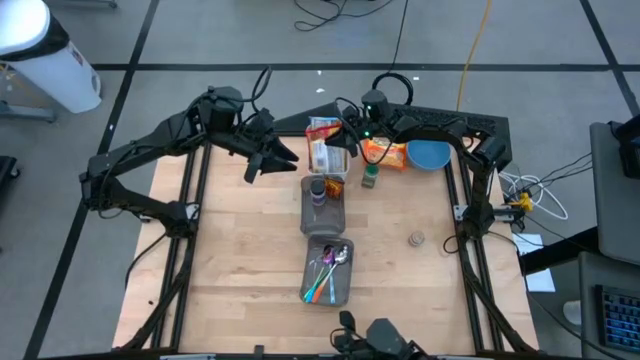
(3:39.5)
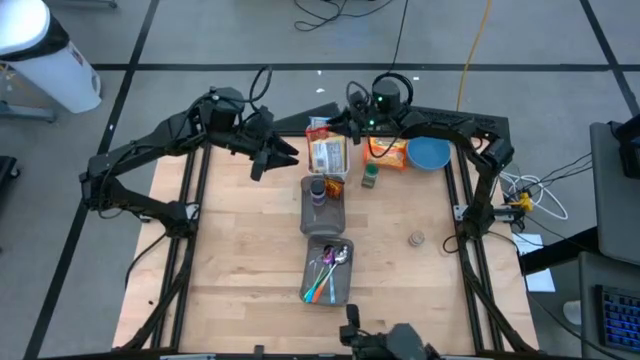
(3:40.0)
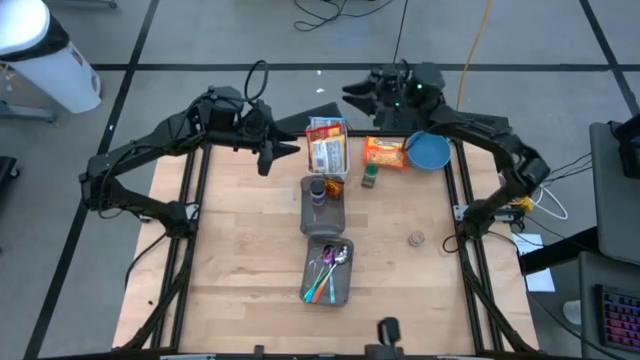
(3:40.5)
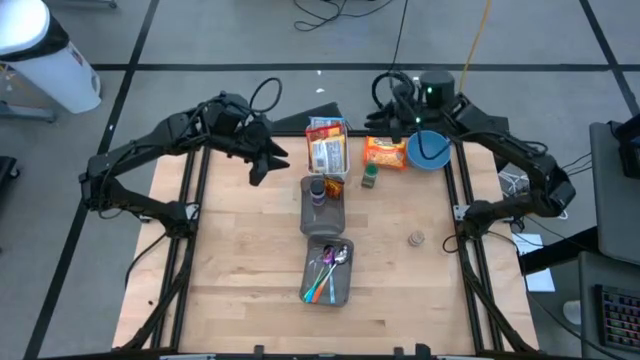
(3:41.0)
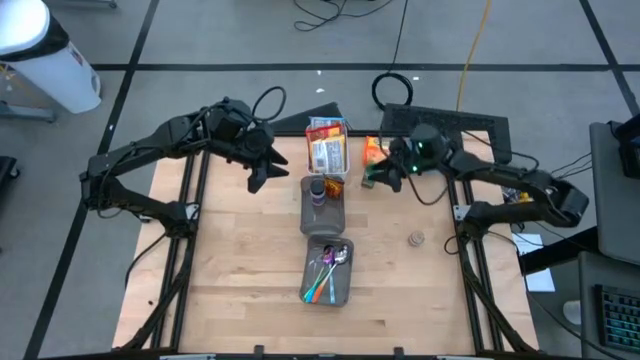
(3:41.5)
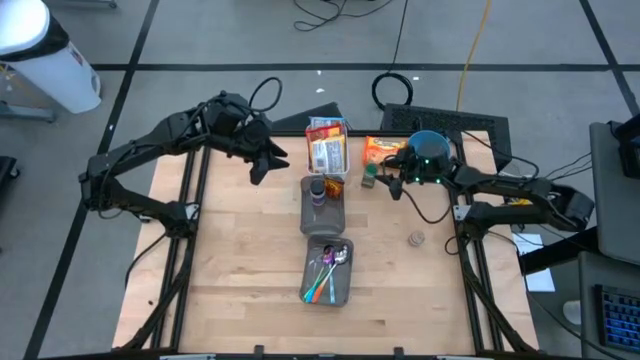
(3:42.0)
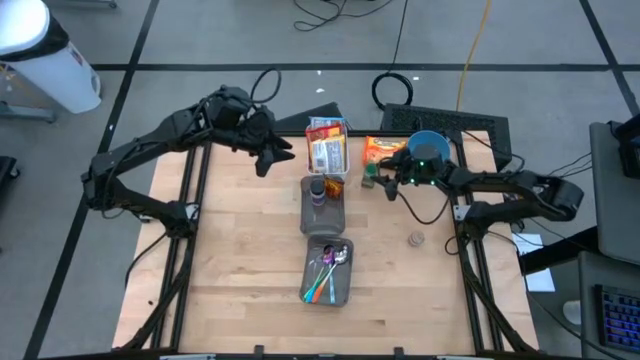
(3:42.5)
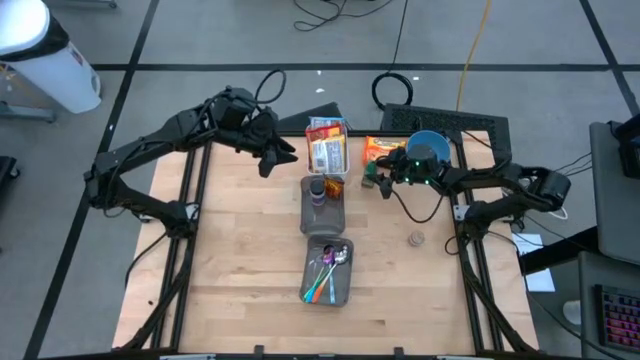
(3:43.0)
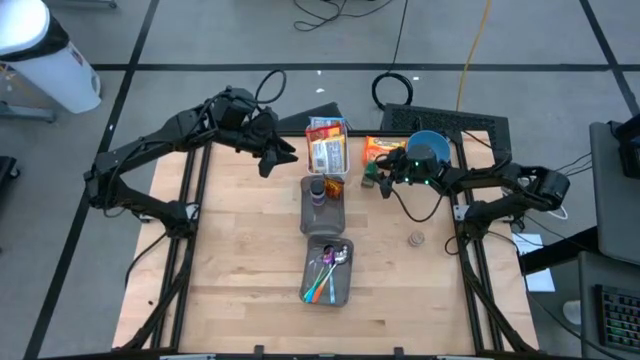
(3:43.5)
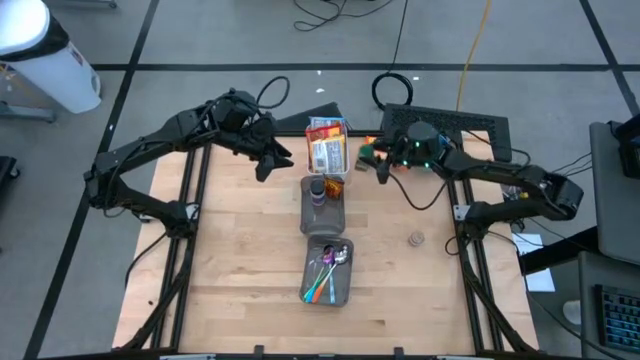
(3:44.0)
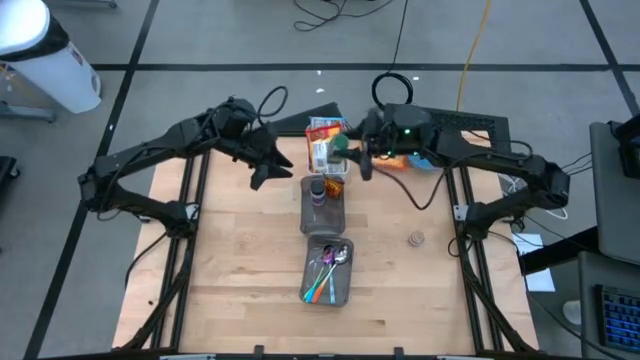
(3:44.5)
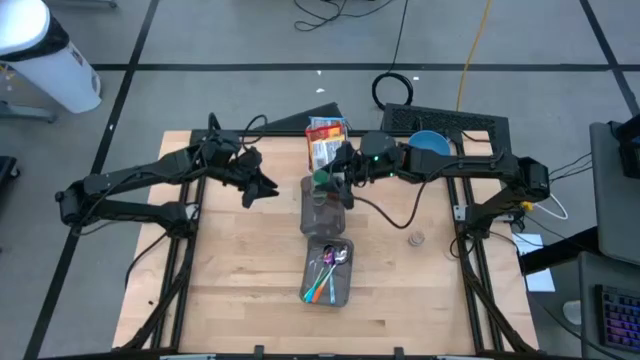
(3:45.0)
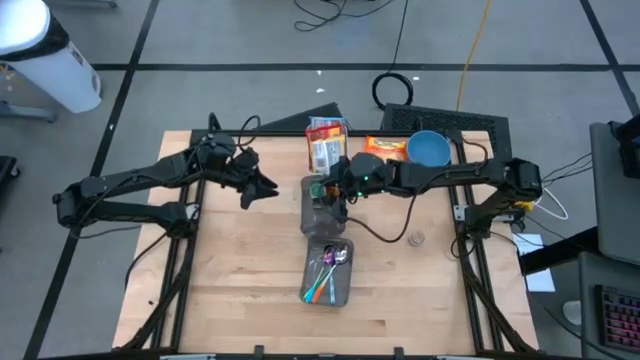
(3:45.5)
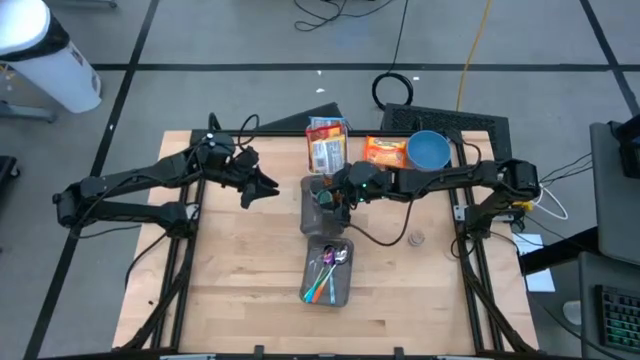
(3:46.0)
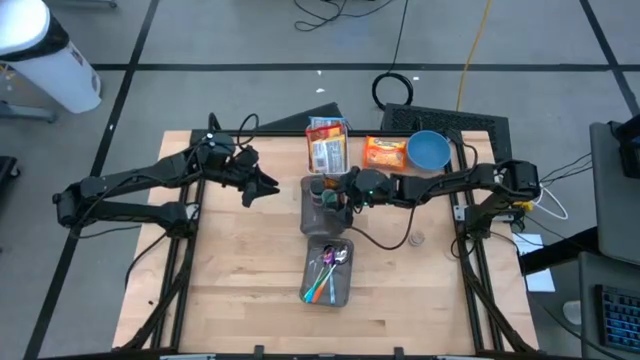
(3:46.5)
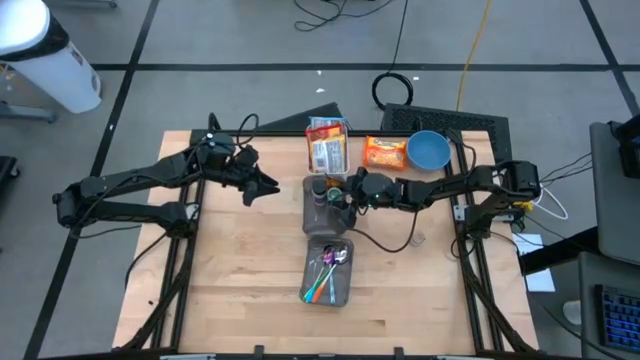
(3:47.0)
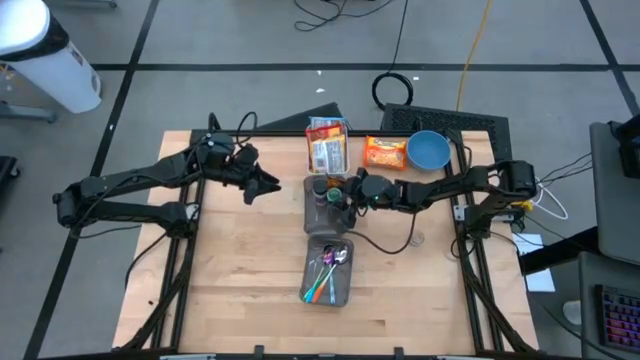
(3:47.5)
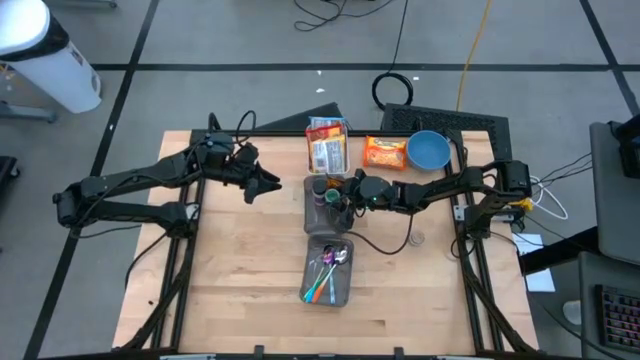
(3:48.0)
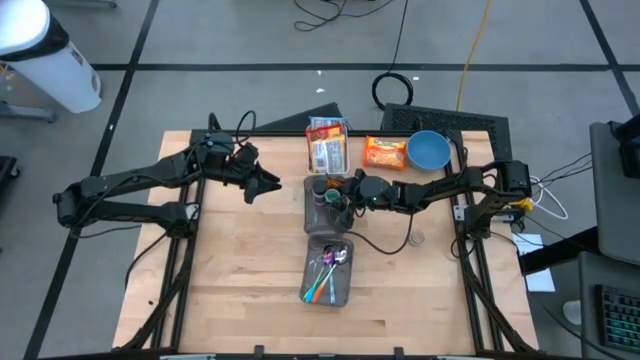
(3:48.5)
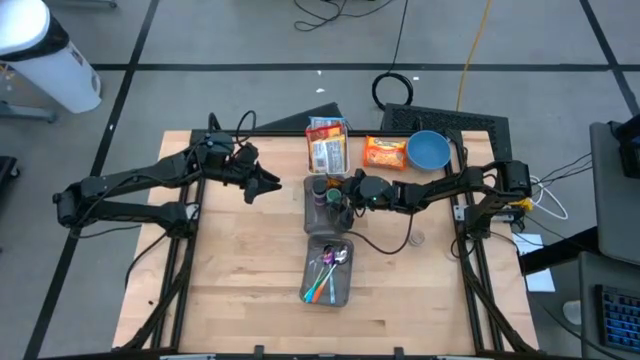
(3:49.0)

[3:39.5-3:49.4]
Task: Pick & Place Food Item
Put the green seasoning bottle into the top black bin

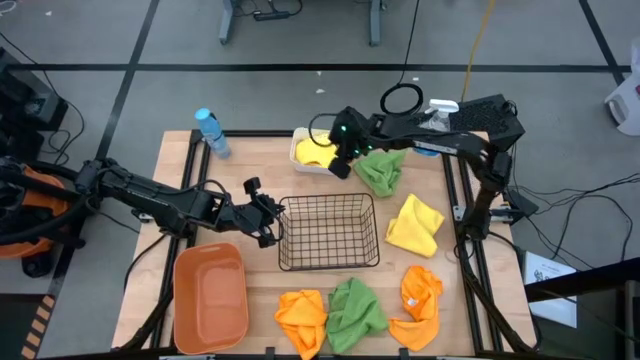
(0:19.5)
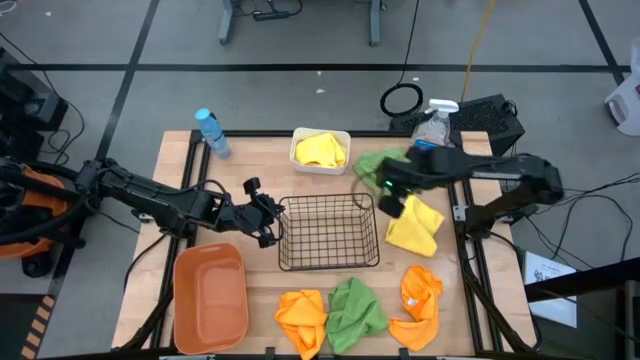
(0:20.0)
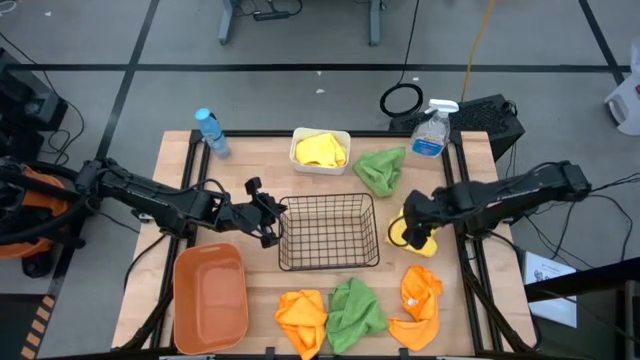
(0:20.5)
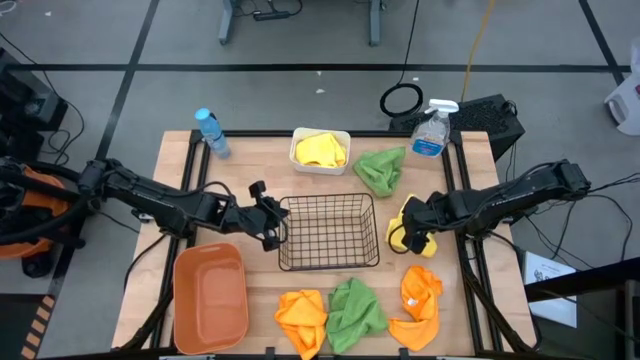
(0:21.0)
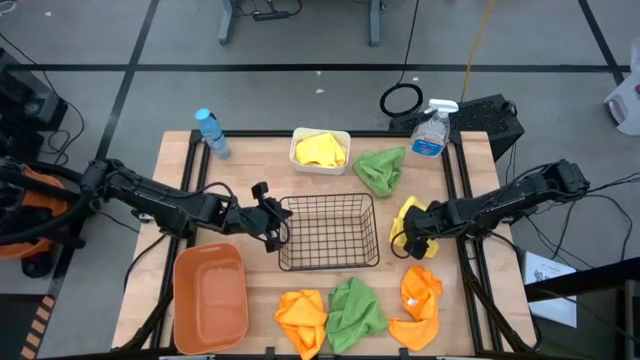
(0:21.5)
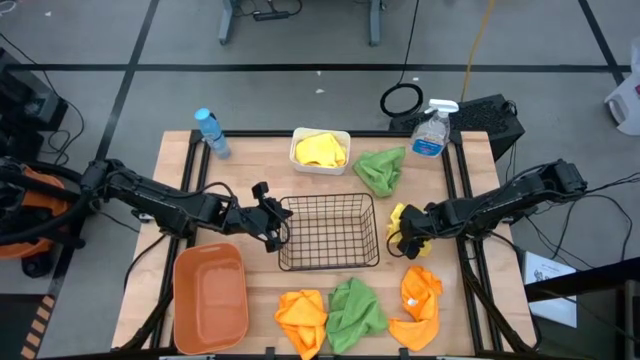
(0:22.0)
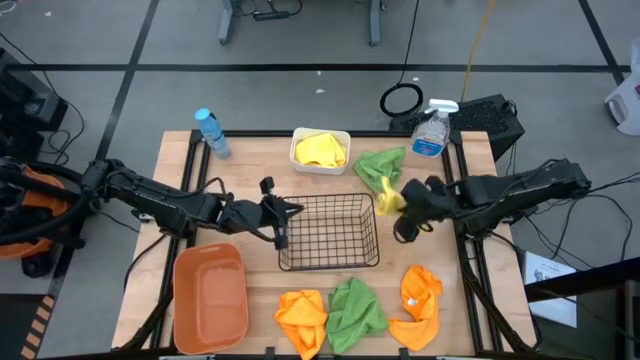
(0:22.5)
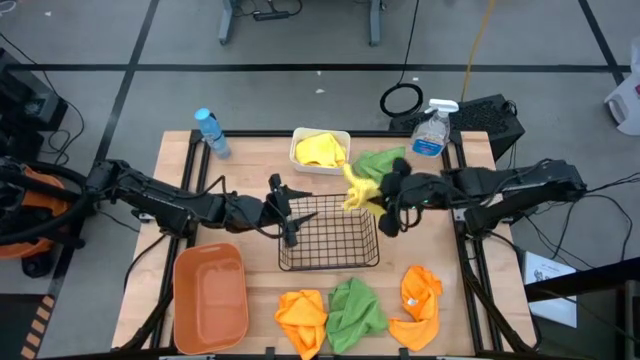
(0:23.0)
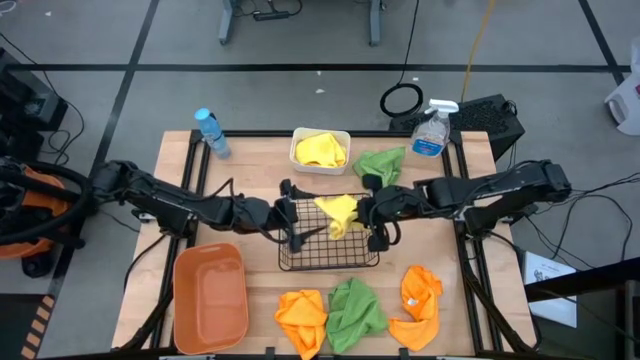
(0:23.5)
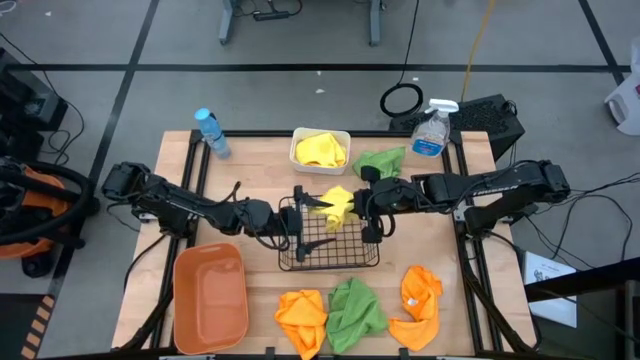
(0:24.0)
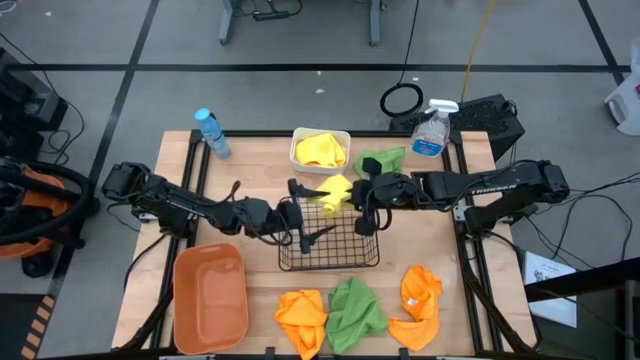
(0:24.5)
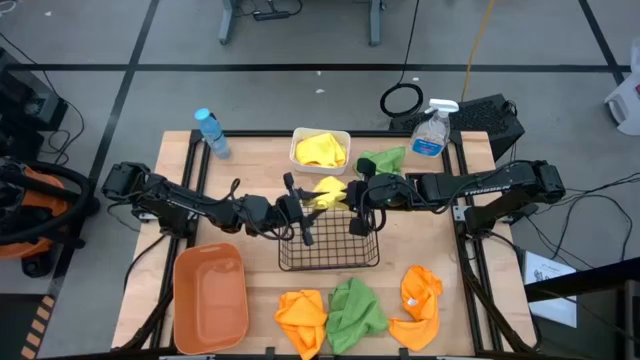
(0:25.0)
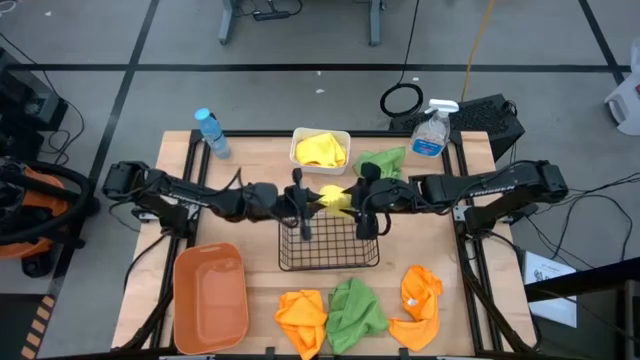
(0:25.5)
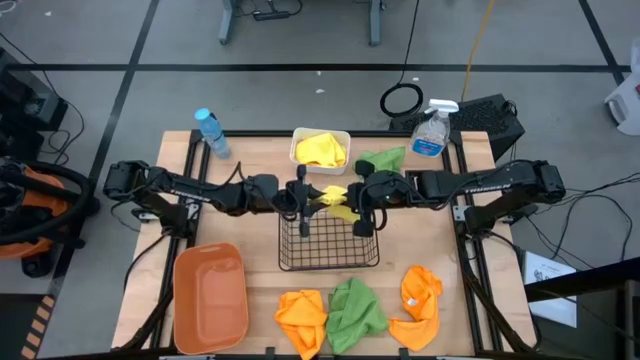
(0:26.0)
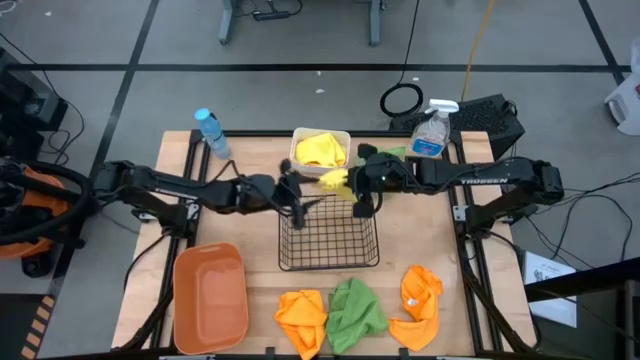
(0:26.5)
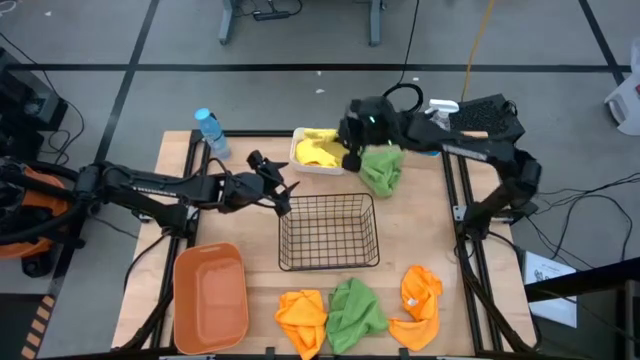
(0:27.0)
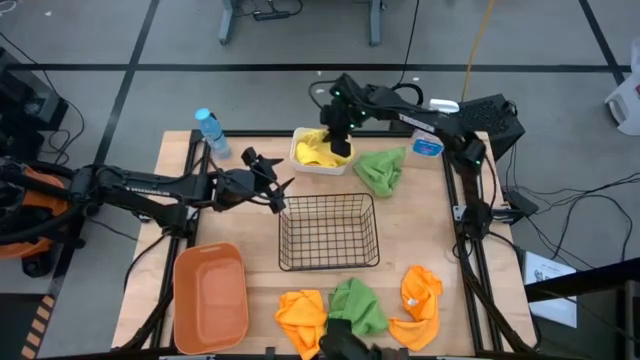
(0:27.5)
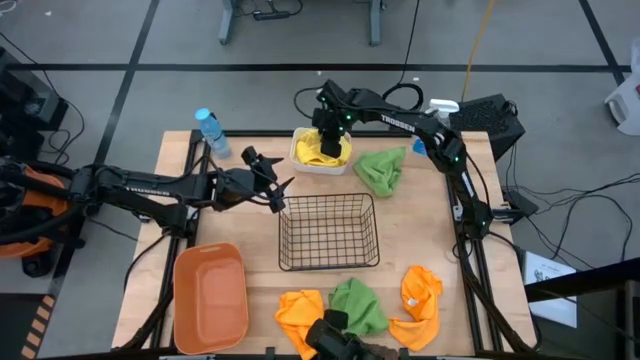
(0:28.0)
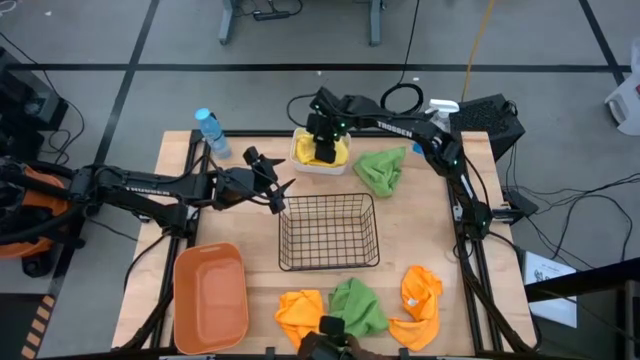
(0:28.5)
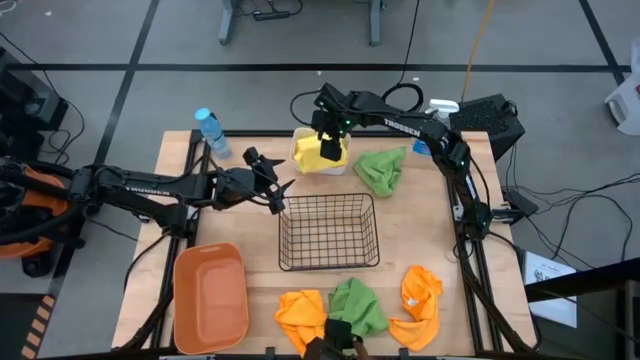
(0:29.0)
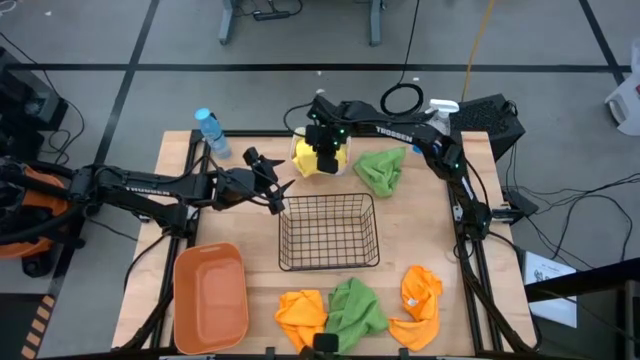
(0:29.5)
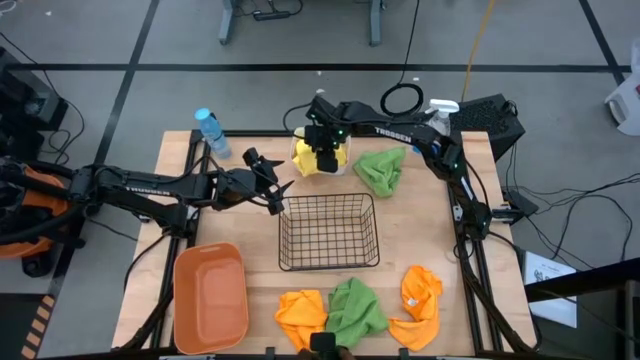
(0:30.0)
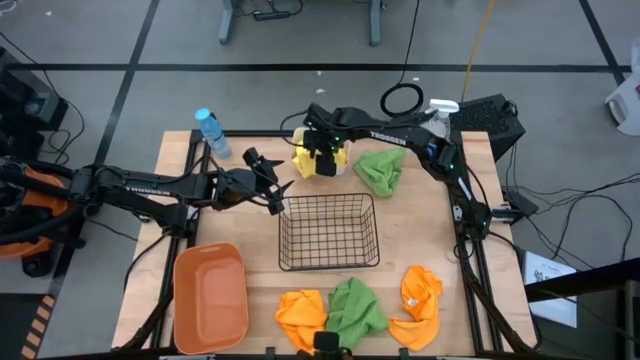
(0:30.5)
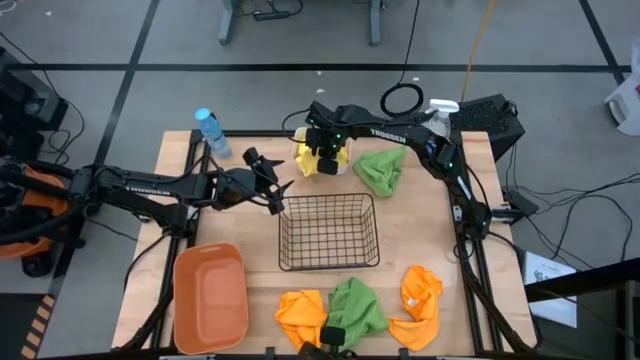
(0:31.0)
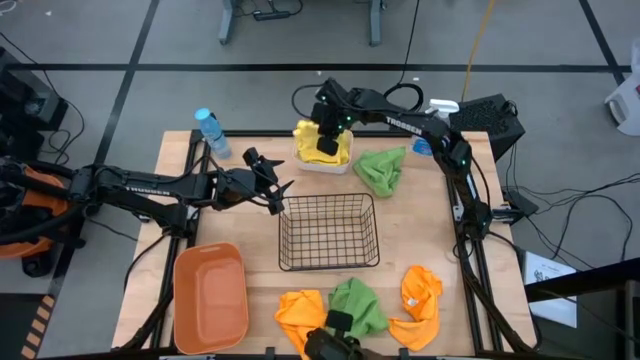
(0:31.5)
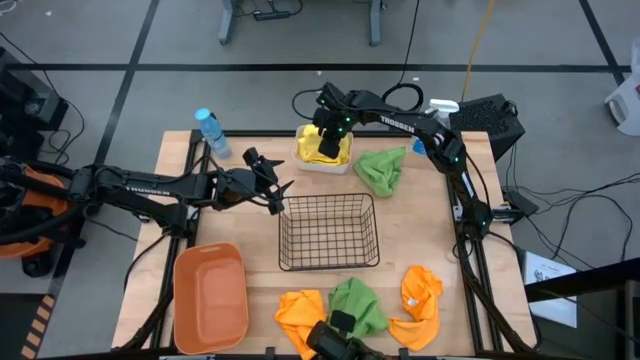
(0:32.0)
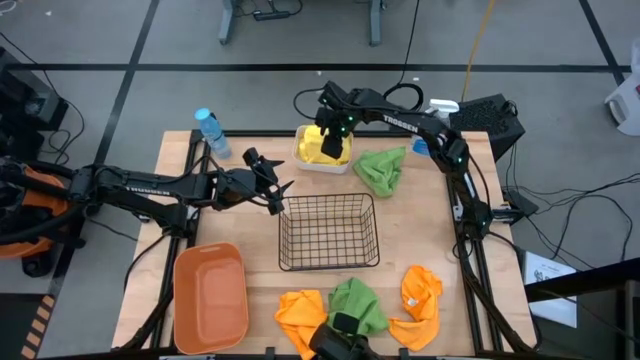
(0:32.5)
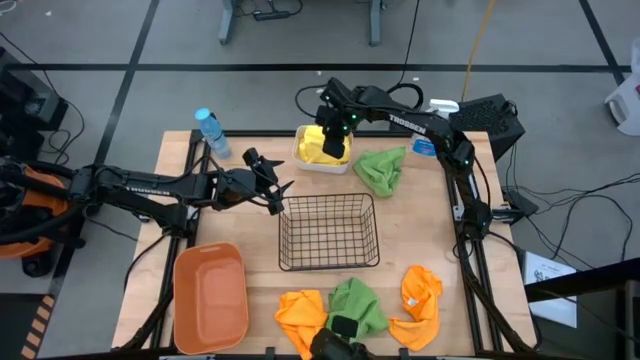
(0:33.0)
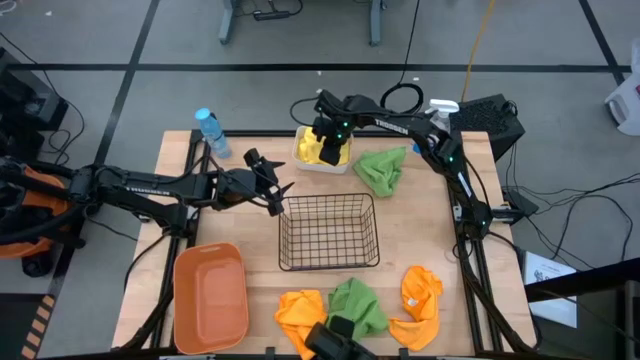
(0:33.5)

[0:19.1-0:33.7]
Task: Sort microfiber towel by color & place in baskets
Put the yellow microfiber cloth into the white bin
